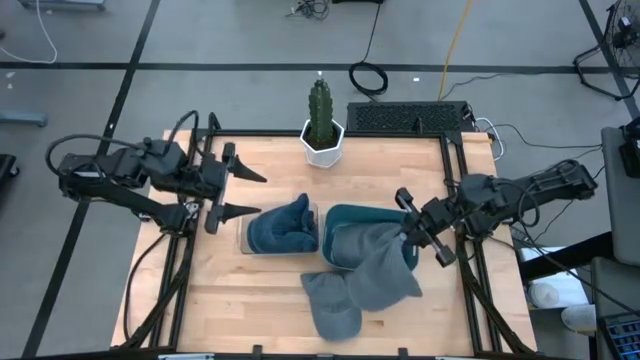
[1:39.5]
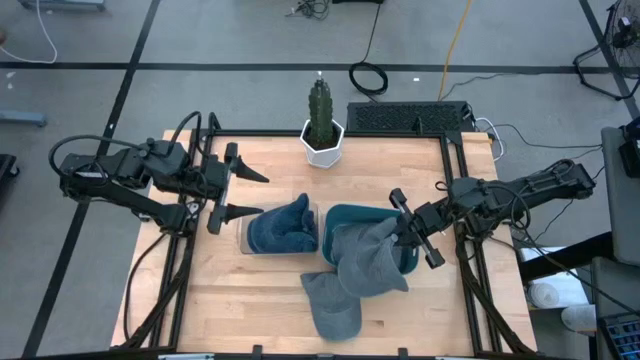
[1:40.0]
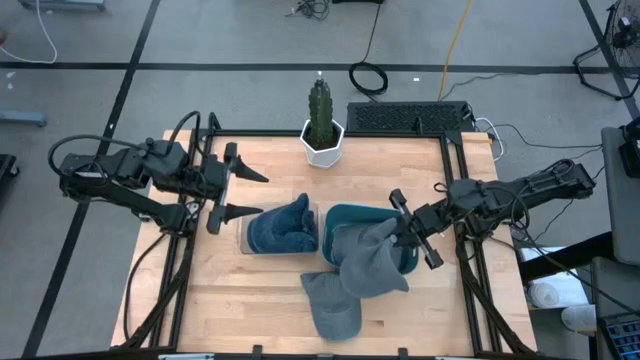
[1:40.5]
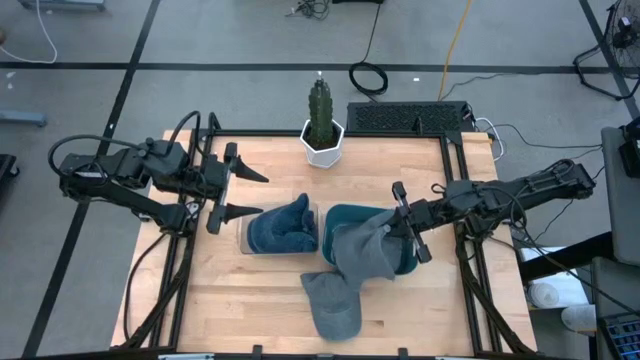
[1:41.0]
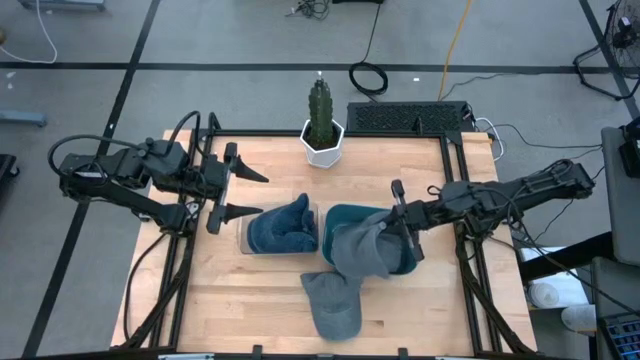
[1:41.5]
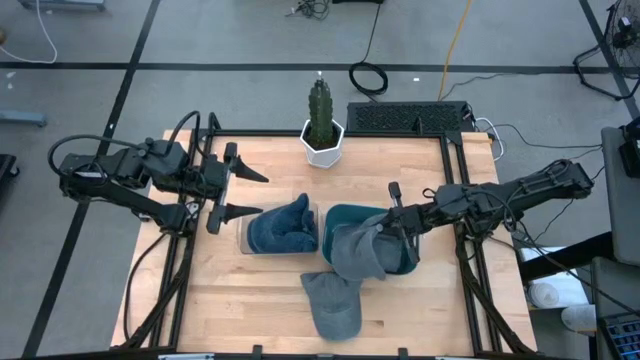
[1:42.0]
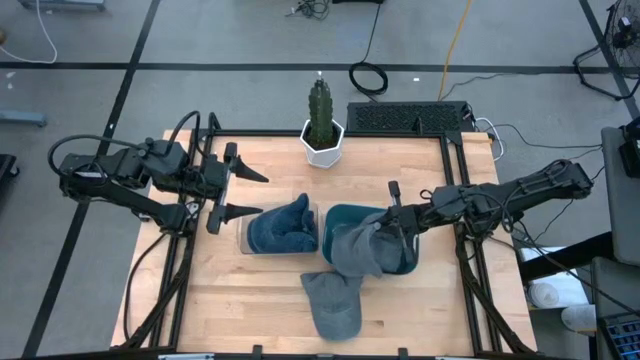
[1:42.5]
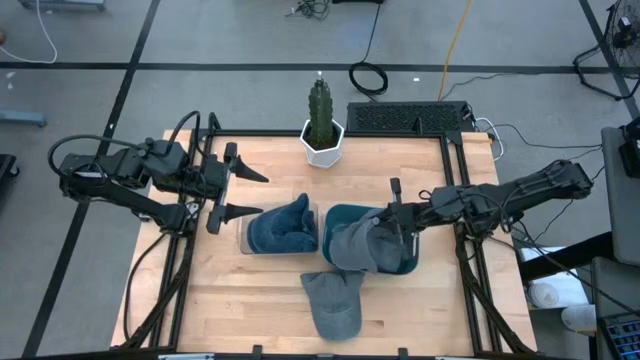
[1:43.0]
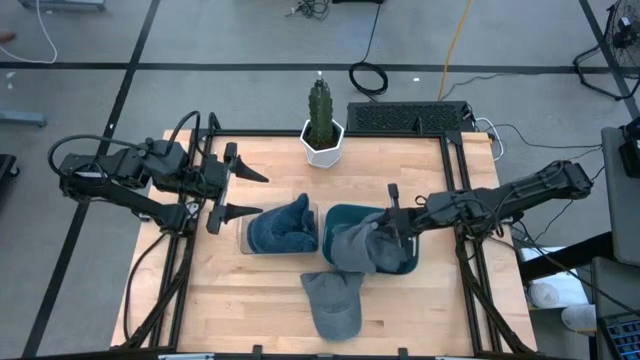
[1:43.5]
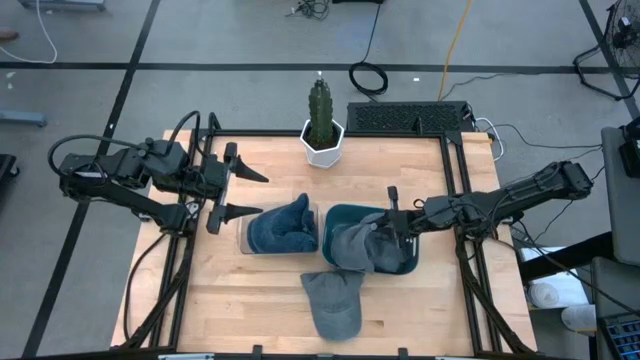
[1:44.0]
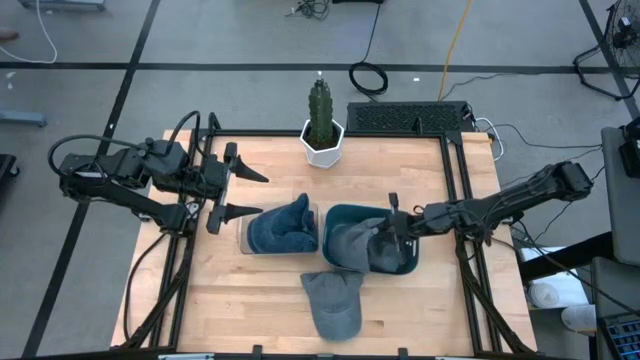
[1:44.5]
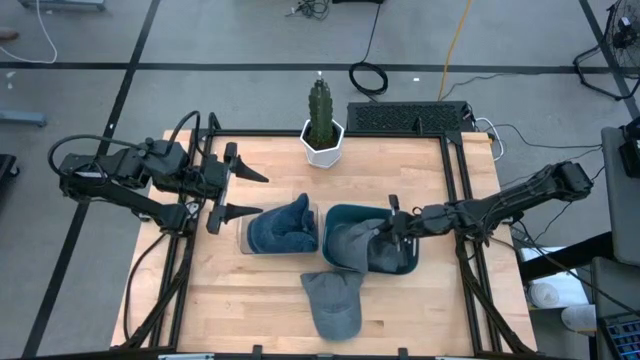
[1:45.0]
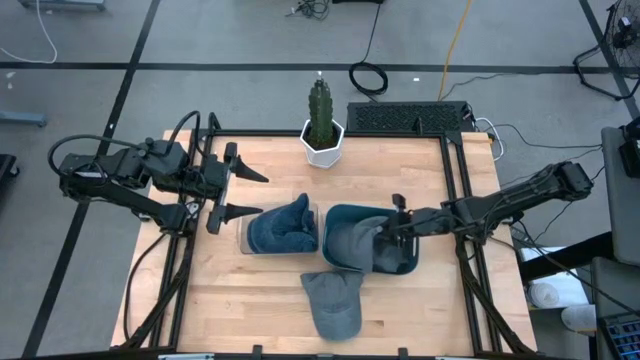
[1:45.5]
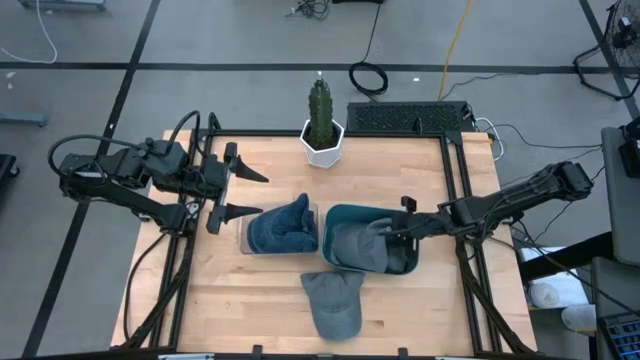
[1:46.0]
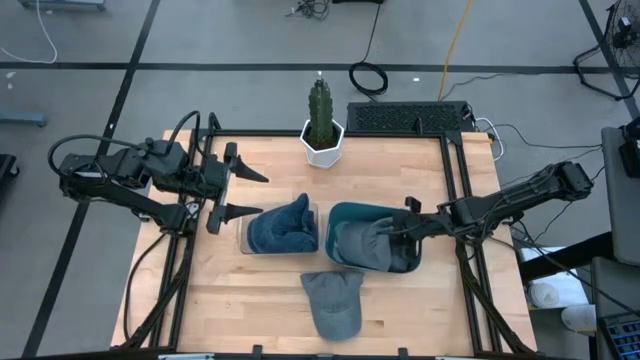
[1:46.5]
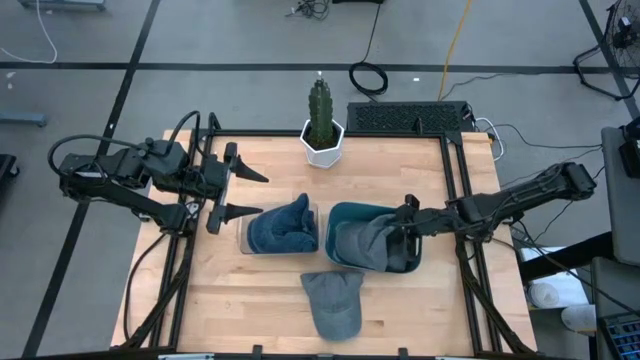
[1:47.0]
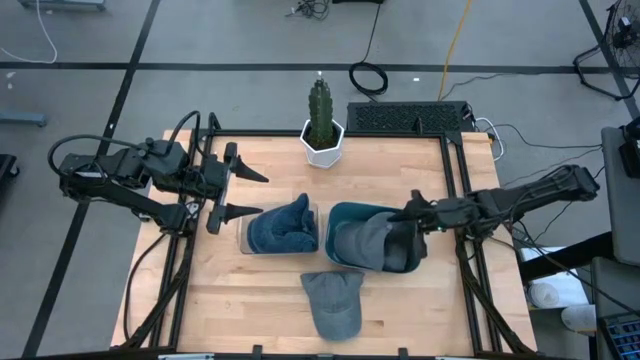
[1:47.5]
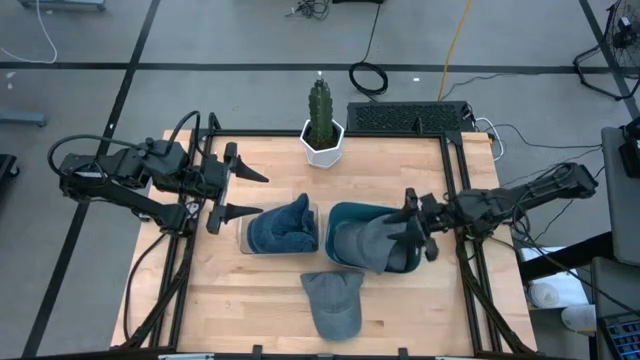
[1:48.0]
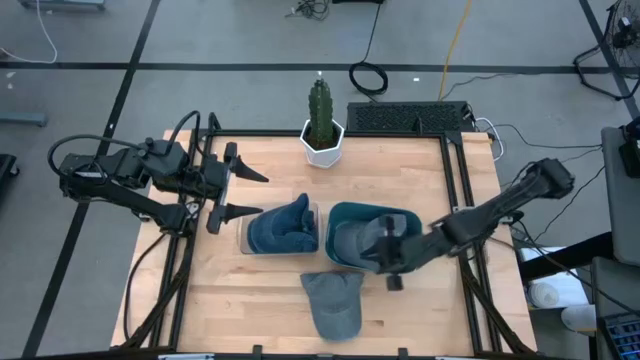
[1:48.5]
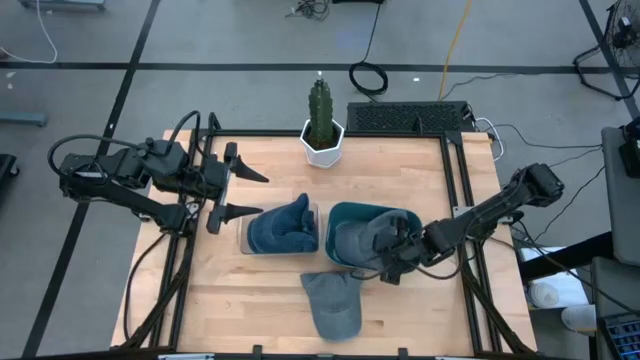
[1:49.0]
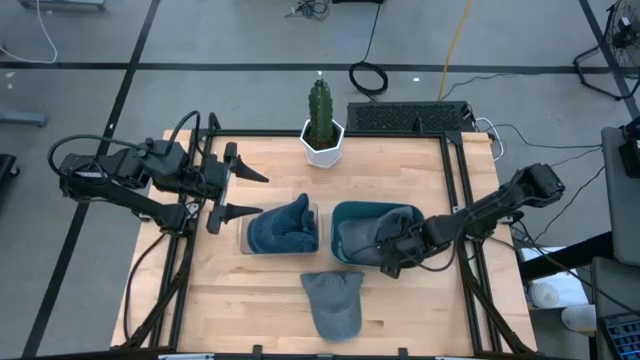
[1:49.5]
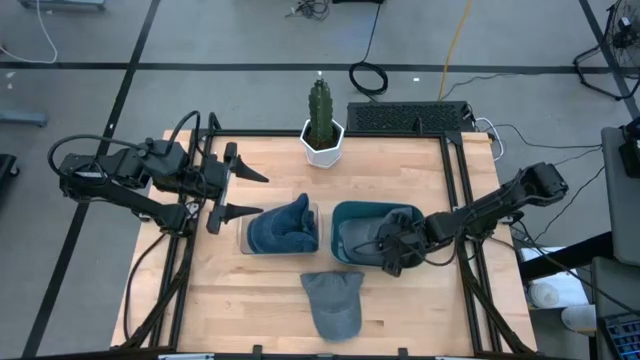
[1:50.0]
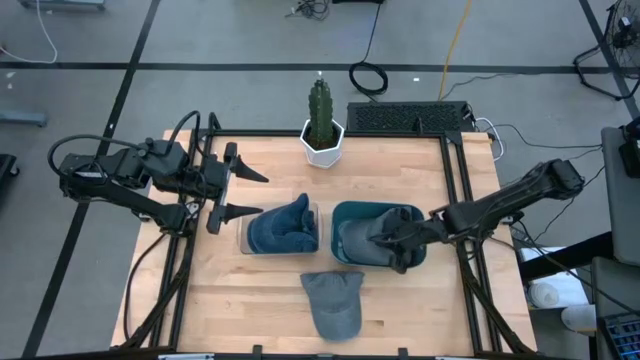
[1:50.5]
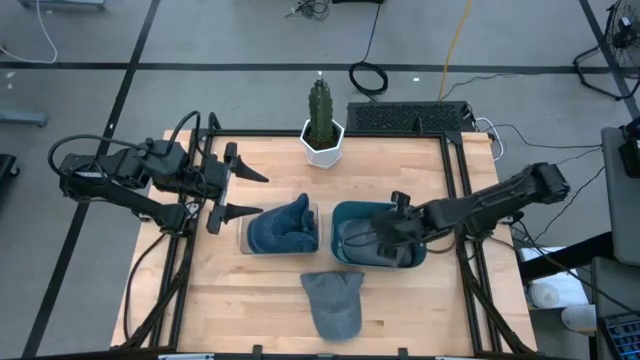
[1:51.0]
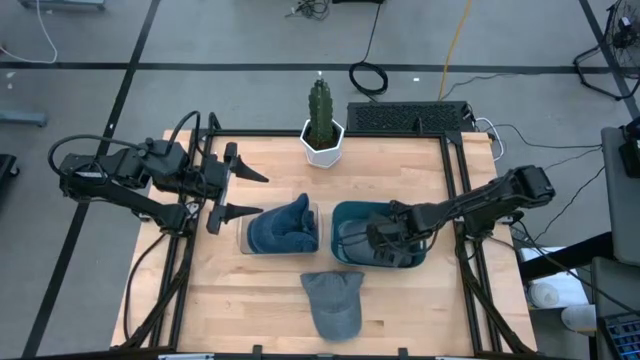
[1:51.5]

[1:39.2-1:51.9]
Task: Pick & Place hat
Put the left gray cap into the blue bin

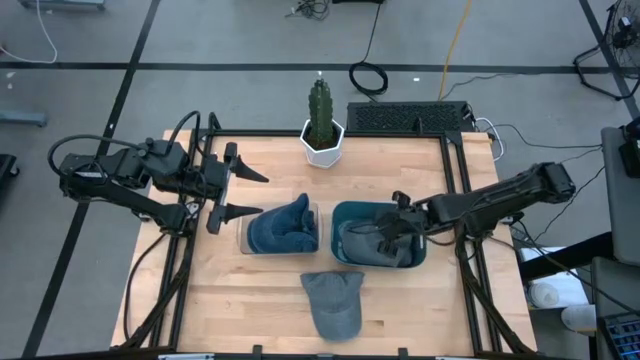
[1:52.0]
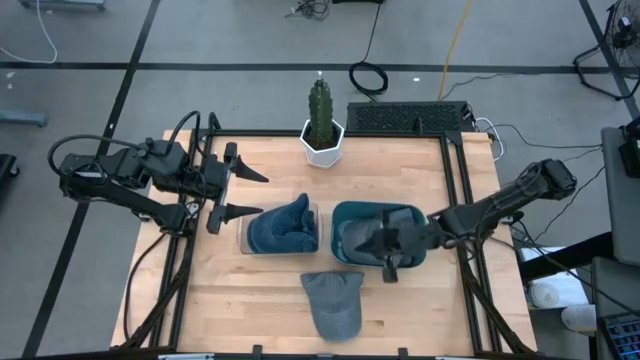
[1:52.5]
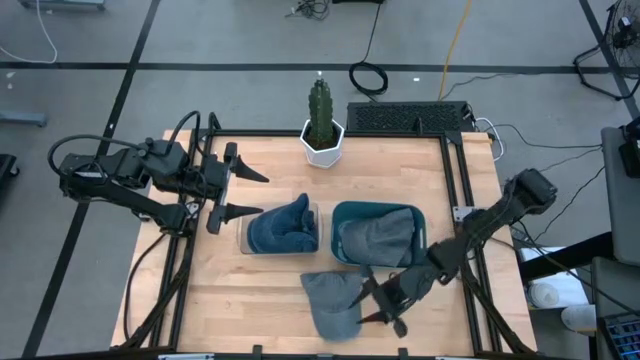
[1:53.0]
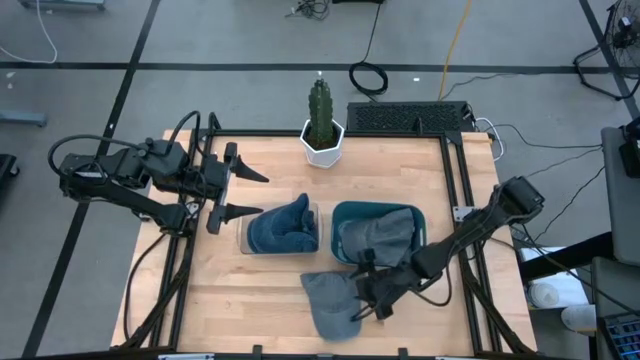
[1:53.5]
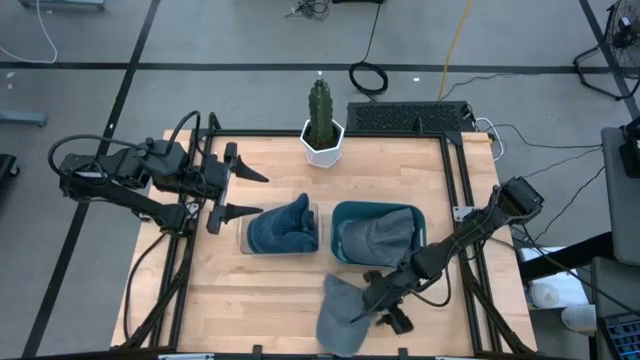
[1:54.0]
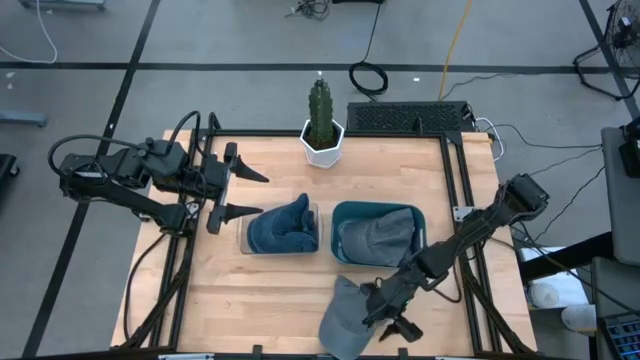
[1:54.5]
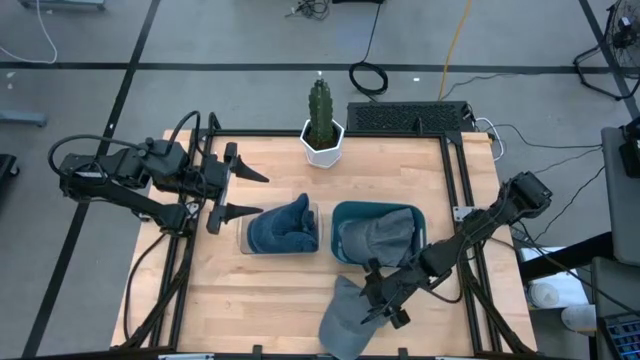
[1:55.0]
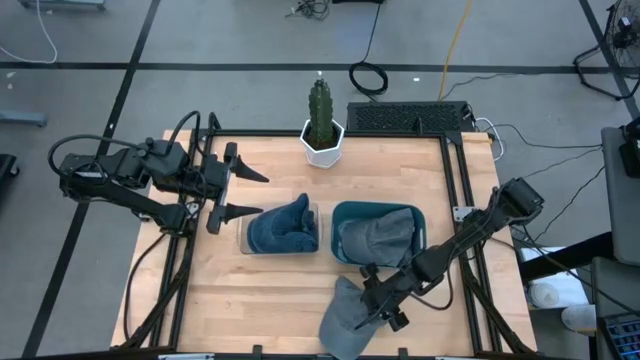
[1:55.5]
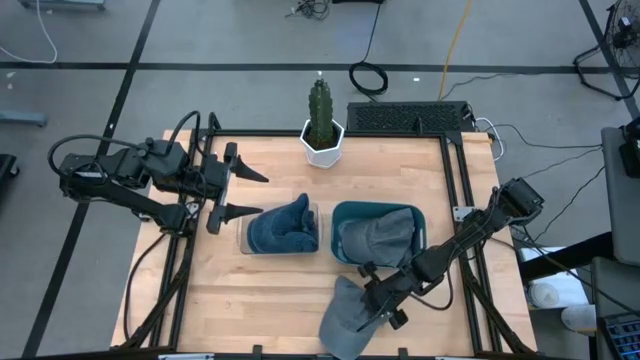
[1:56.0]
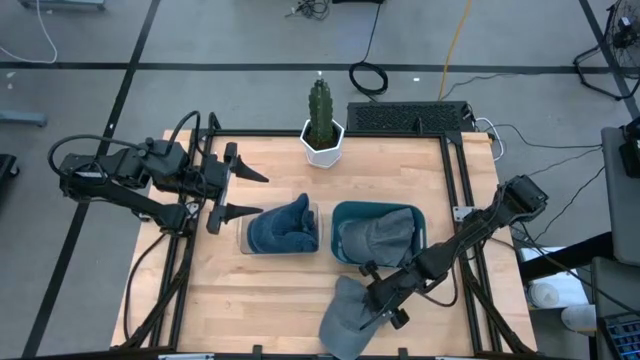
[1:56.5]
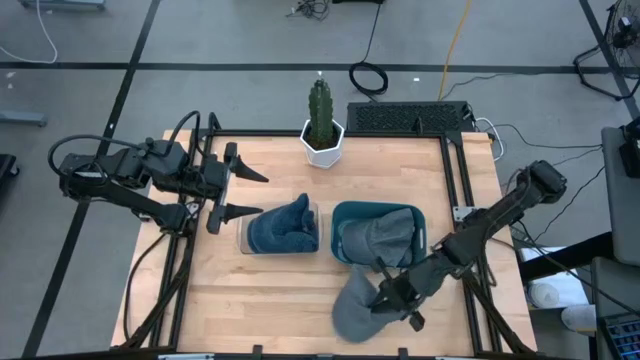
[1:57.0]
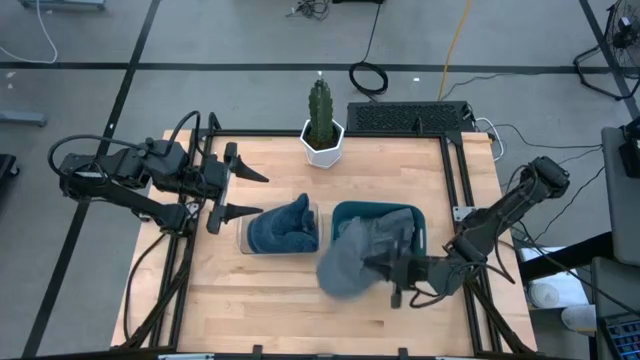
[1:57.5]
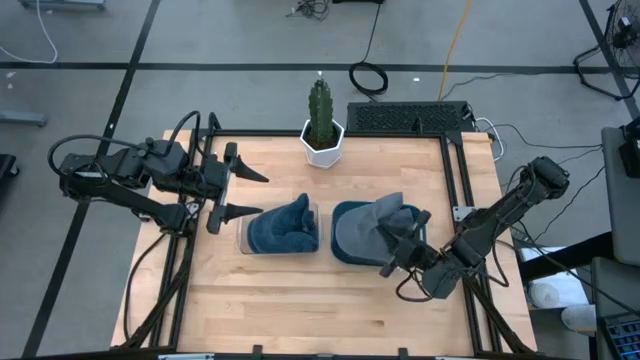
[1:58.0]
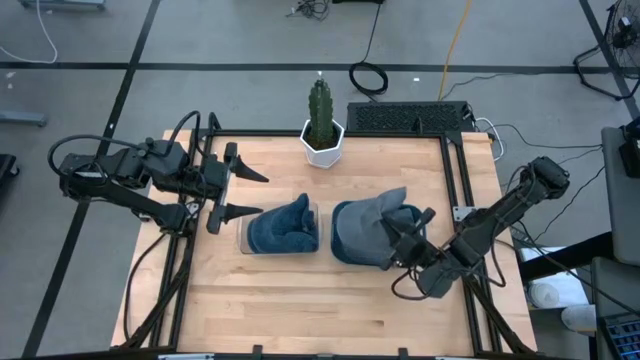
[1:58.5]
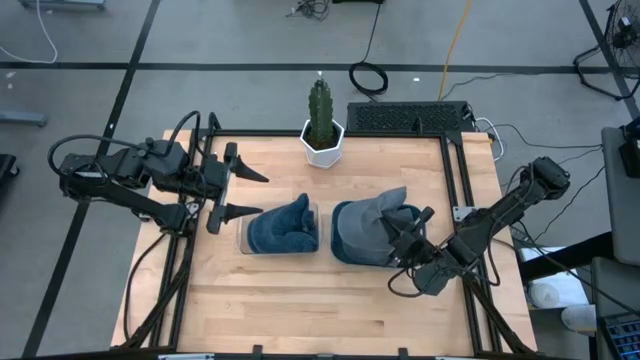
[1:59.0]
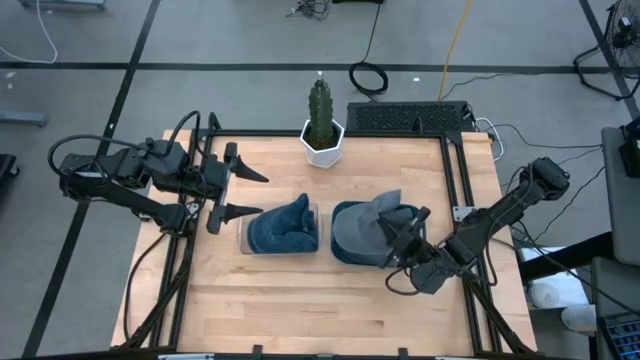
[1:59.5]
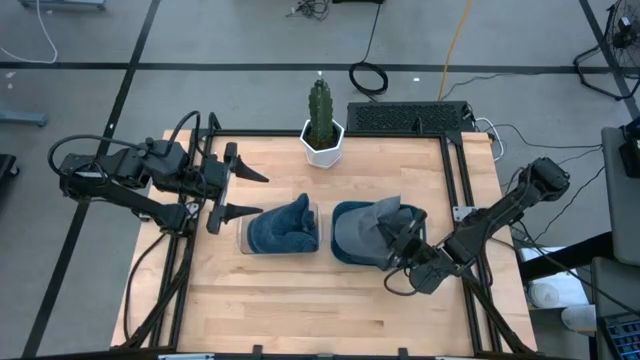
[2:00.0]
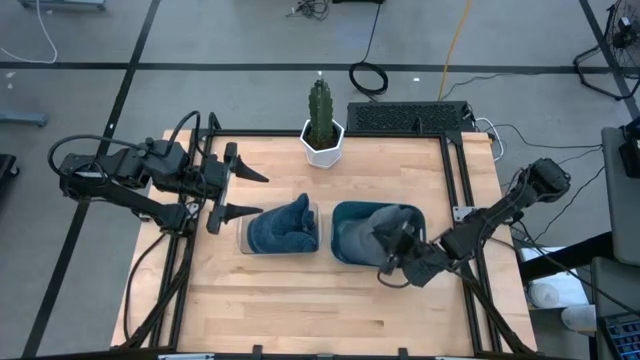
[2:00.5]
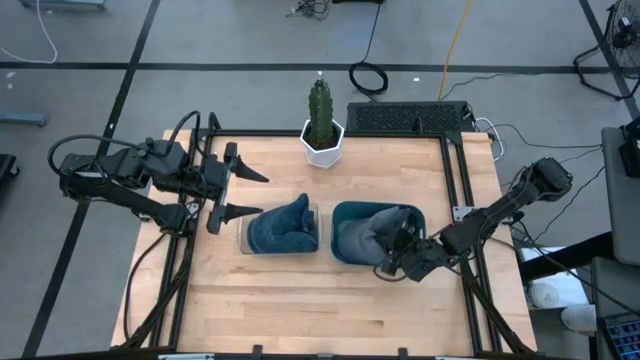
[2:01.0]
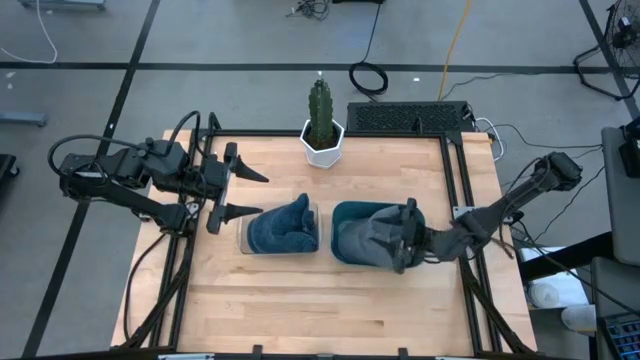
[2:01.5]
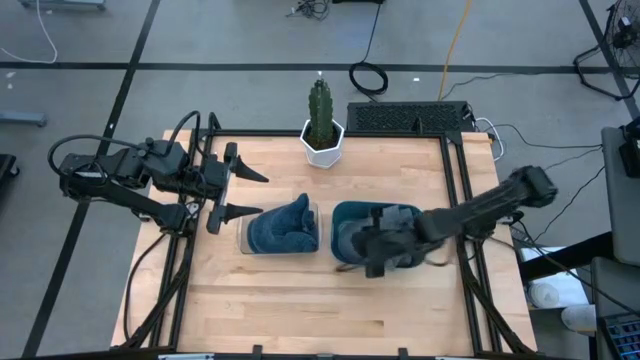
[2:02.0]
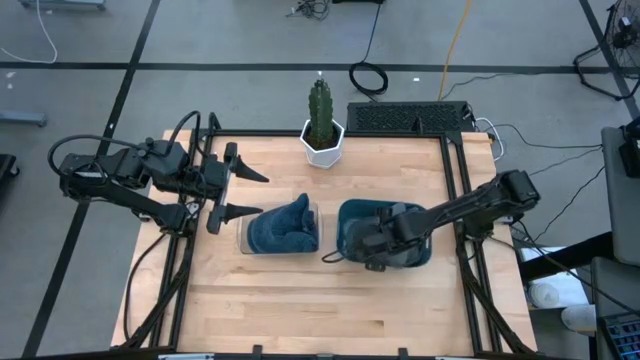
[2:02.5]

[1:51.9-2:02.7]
Put the gray cap into the blue bin
